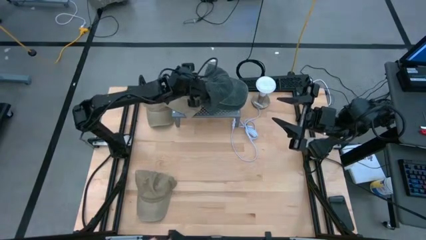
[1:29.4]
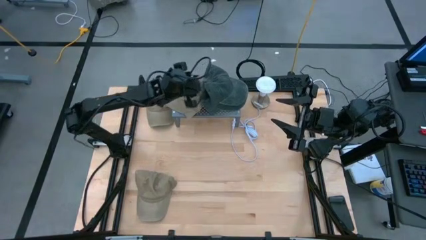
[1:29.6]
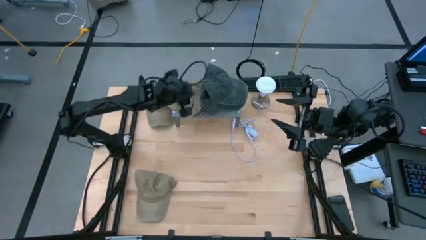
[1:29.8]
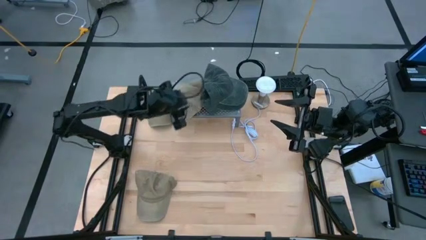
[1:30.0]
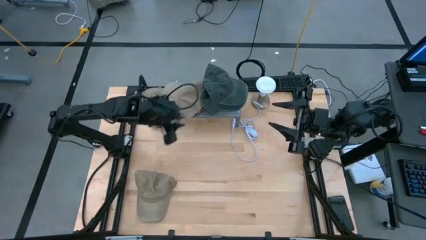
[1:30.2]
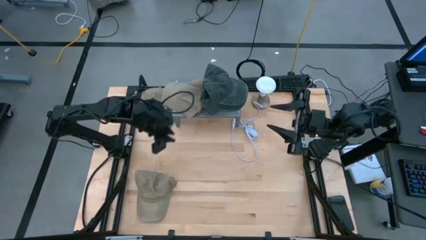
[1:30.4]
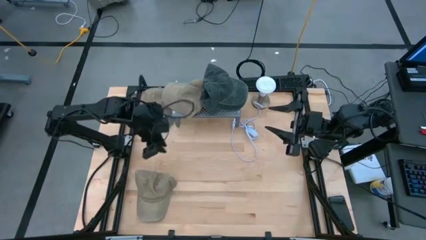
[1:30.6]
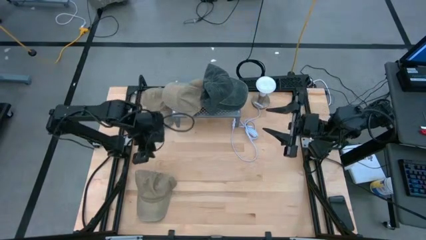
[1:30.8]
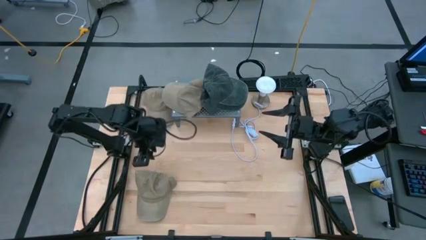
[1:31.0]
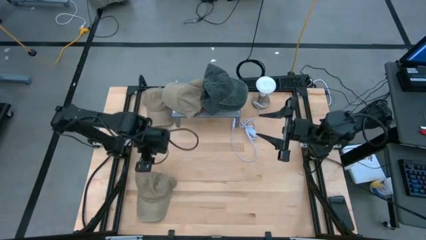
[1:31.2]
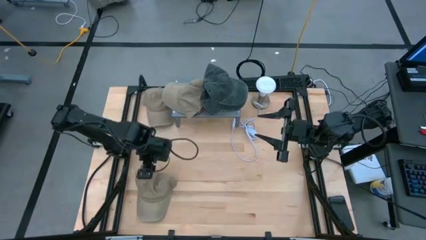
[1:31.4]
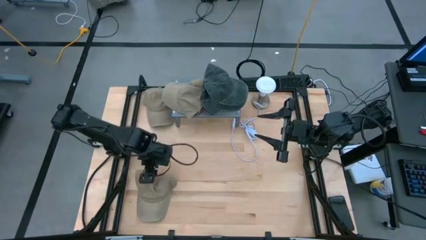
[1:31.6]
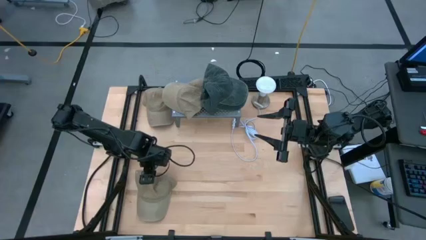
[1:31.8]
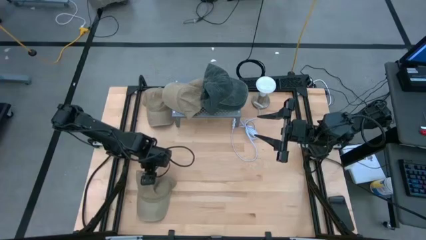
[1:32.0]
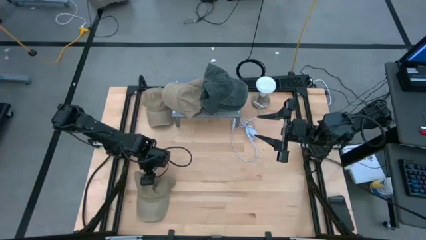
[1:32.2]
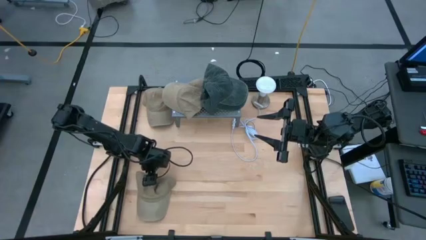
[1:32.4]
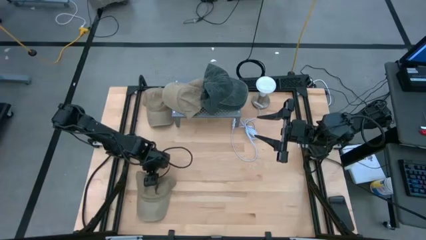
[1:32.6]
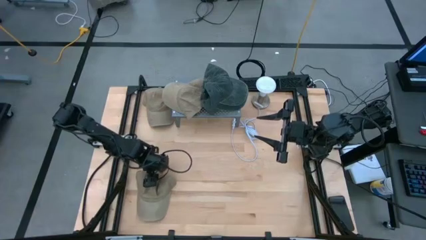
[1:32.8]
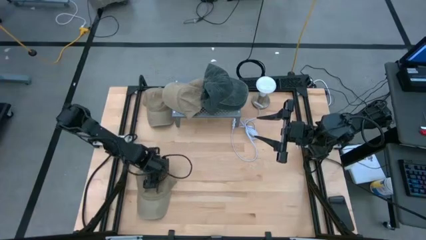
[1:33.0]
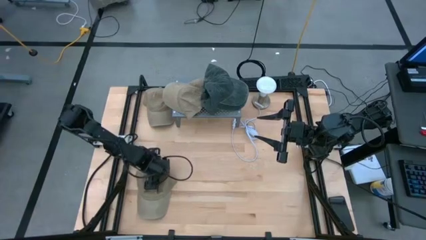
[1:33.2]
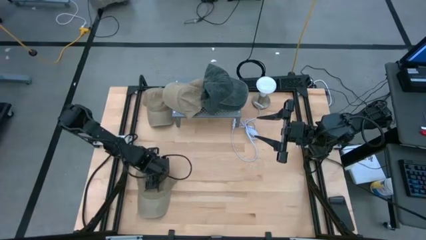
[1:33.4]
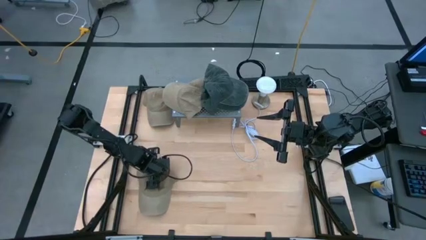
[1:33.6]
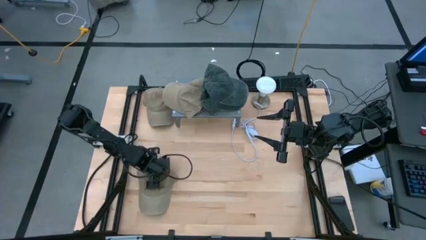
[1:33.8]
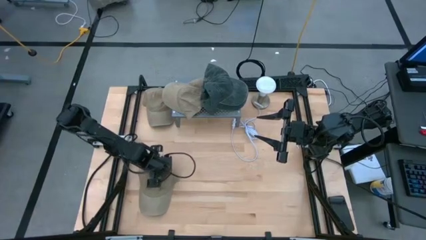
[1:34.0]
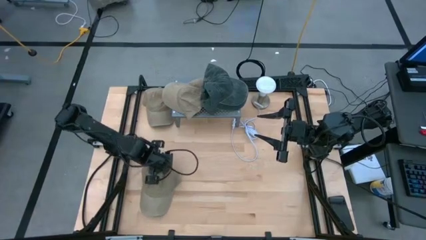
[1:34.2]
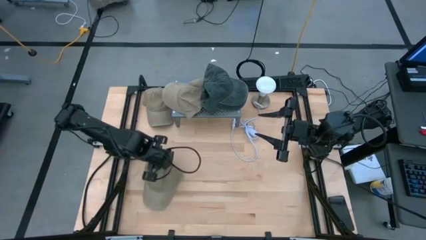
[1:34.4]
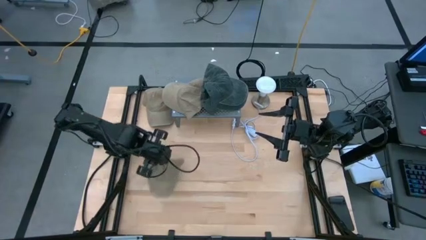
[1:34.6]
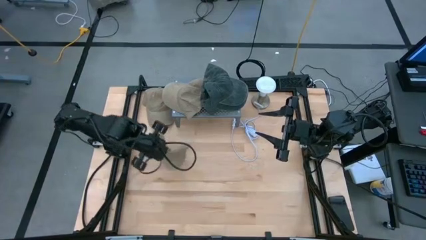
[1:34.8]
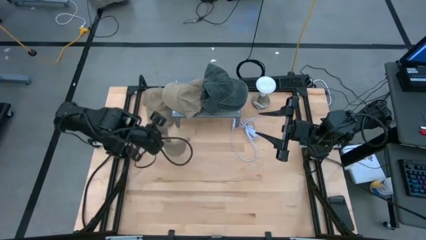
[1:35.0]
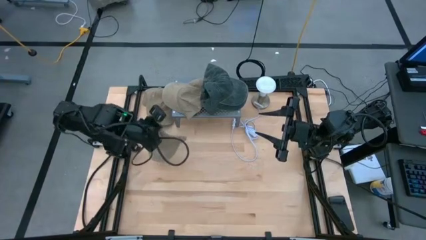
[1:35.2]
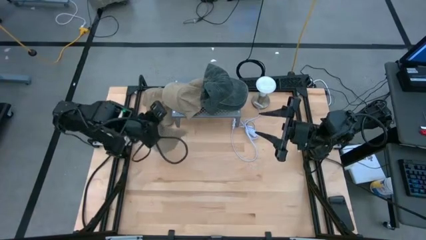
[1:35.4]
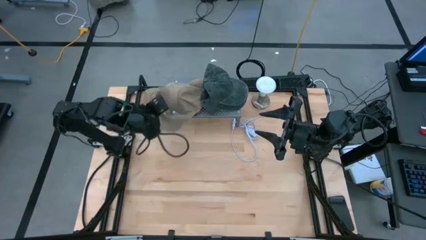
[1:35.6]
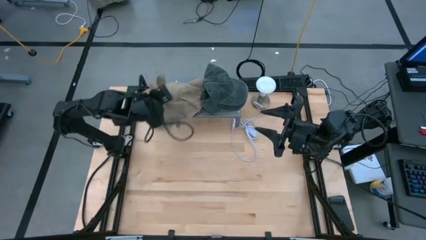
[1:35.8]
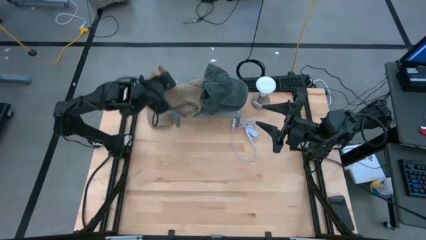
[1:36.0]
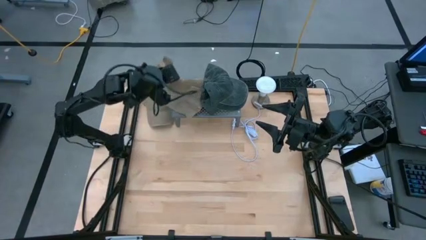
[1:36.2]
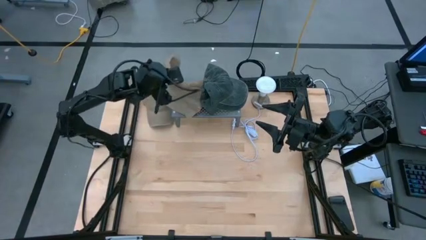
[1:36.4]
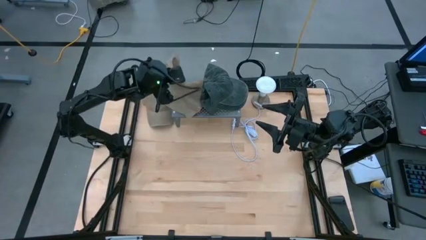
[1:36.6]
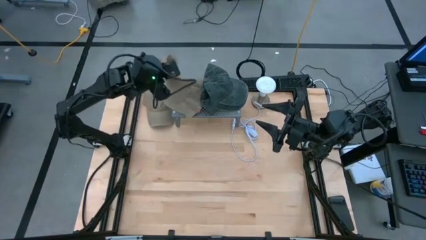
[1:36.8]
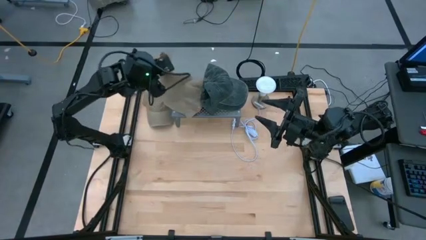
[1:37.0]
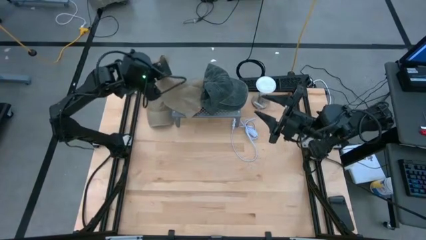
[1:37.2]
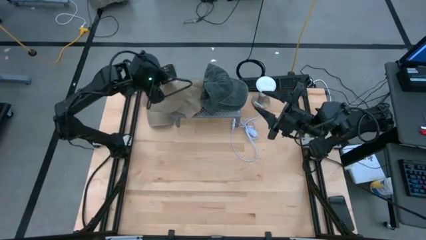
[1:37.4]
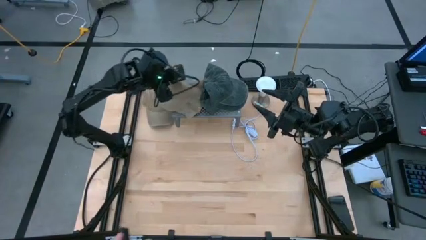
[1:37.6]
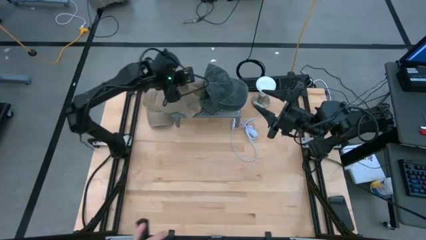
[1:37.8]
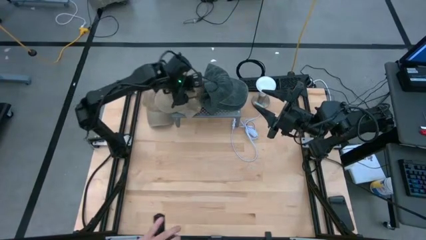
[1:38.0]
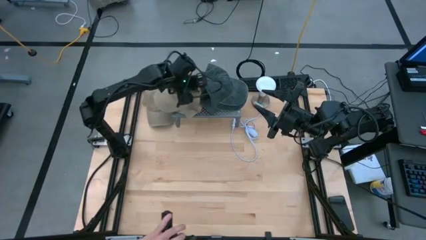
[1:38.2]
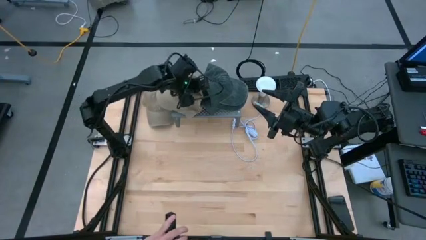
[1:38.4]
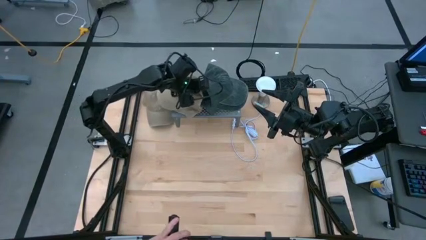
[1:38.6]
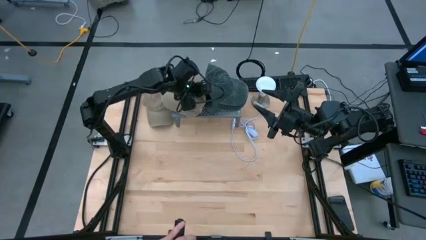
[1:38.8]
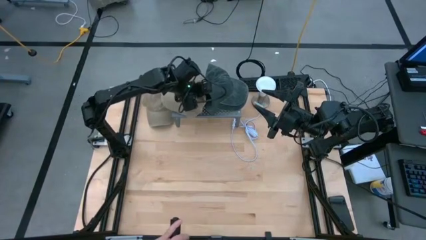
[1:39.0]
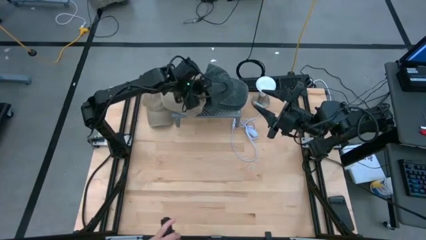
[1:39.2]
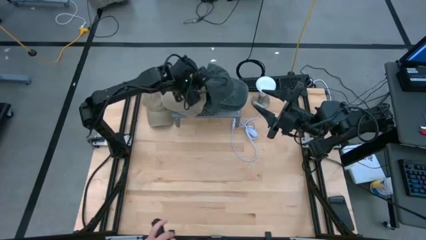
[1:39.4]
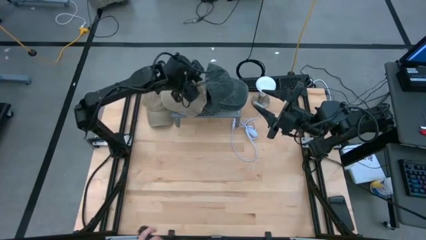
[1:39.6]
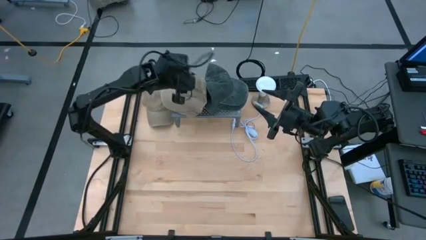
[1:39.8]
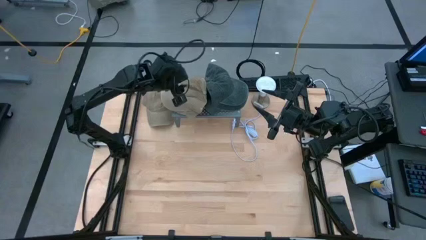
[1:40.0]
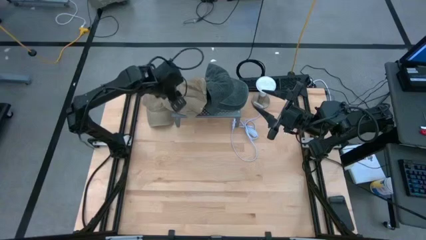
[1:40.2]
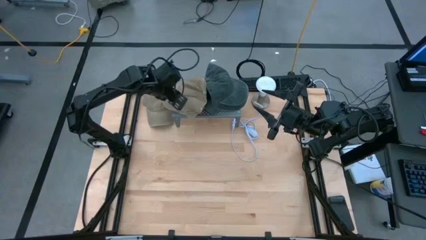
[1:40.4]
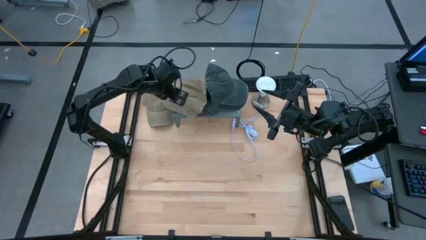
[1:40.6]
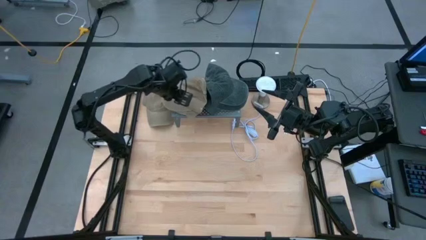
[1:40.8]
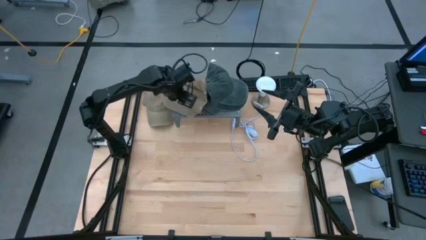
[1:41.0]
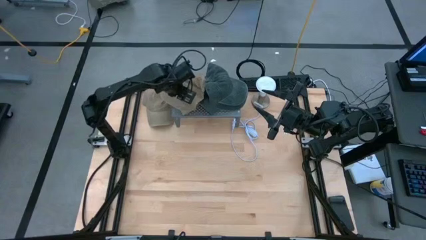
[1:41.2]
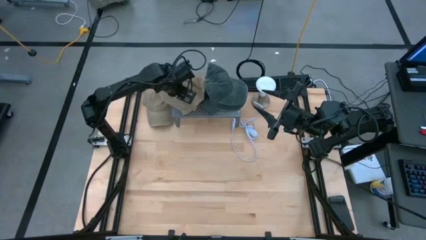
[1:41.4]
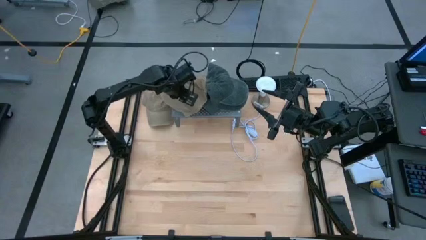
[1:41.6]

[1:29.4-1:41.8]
Task: Pick & Place hat
Stack the bottom brown cap on the brown cap on the shelf
